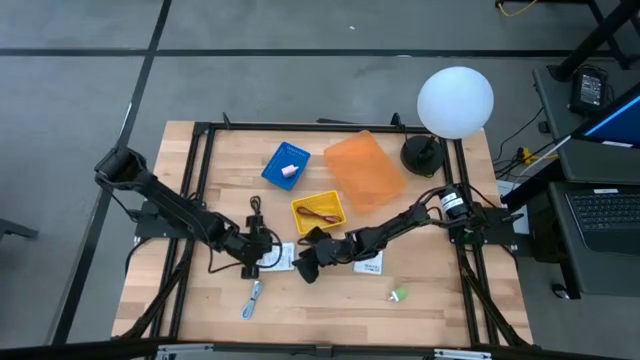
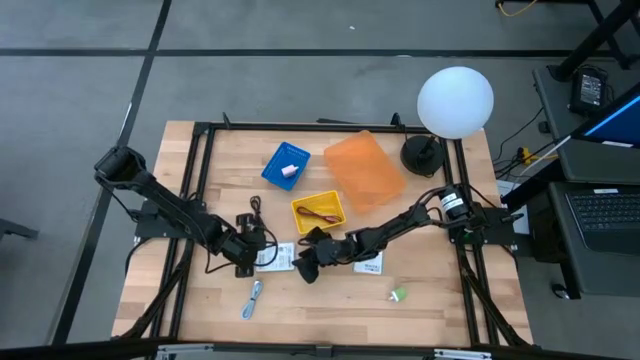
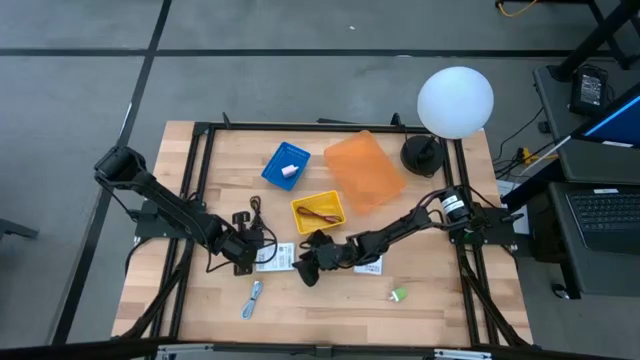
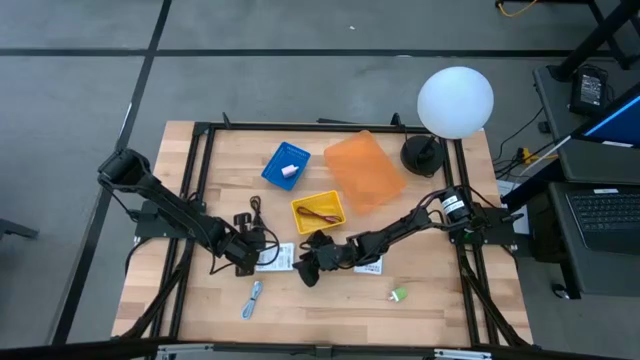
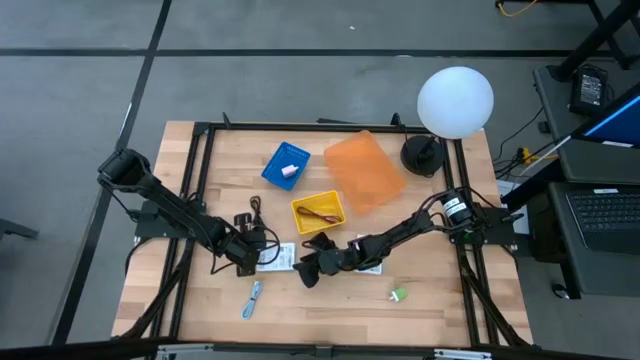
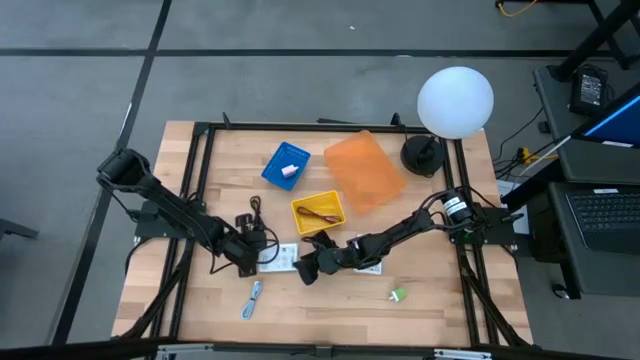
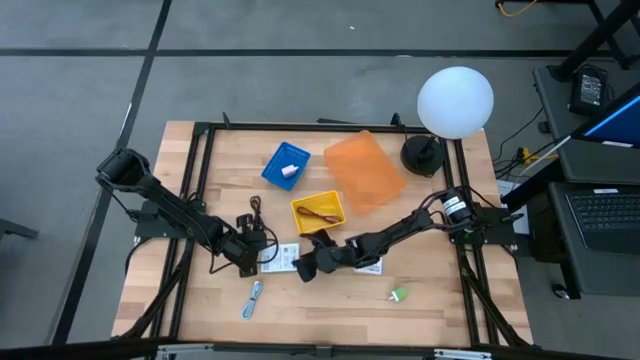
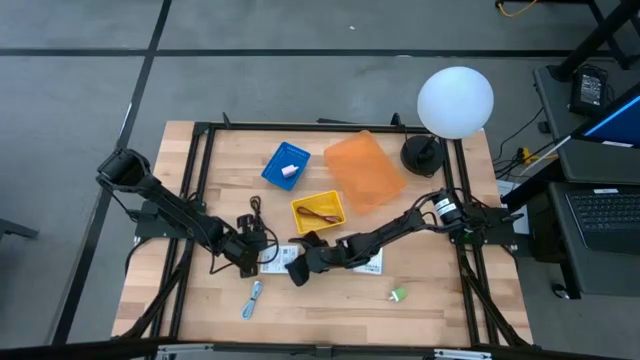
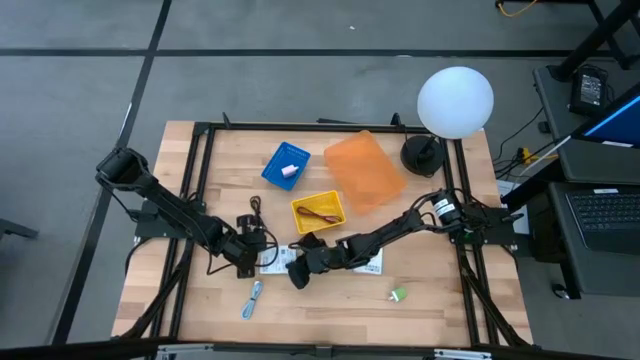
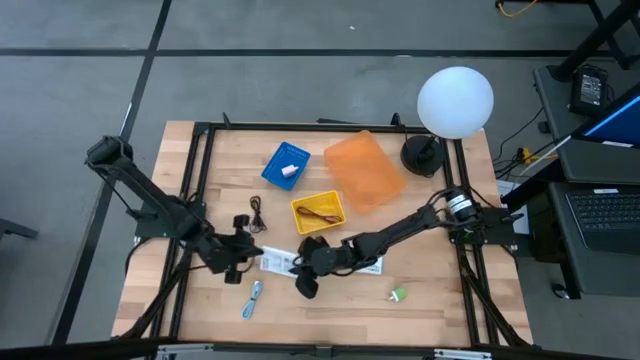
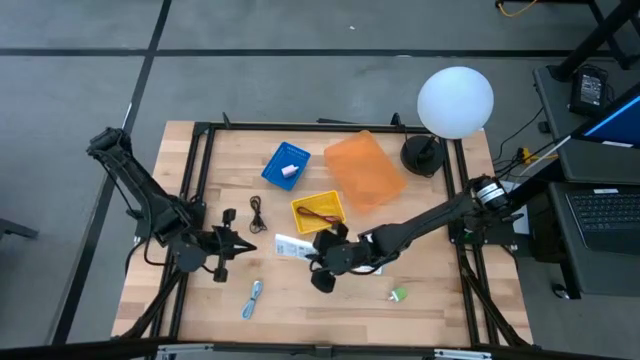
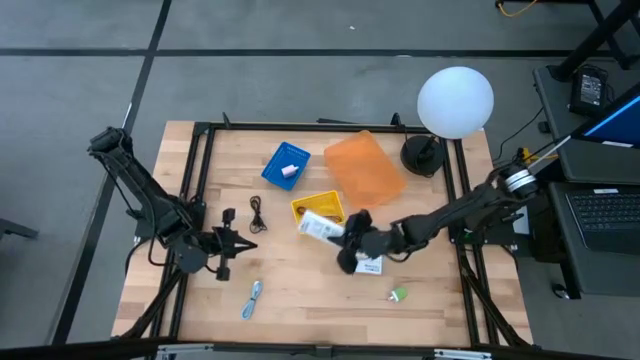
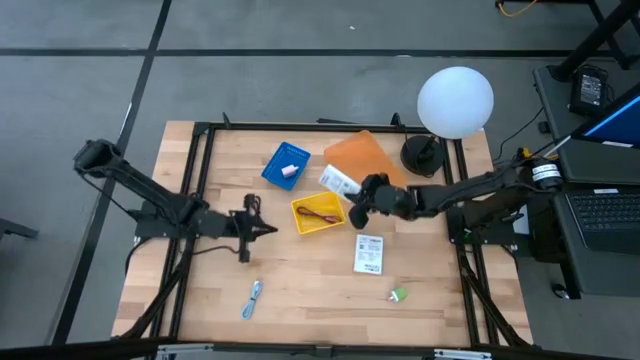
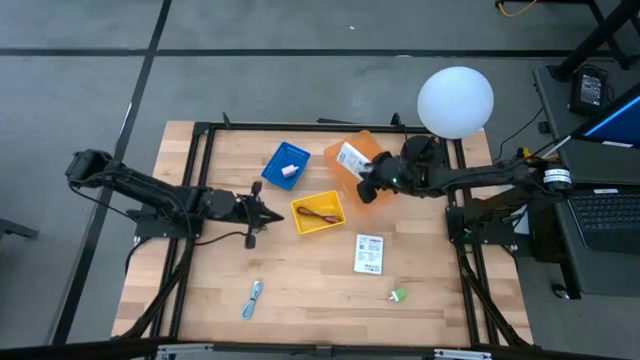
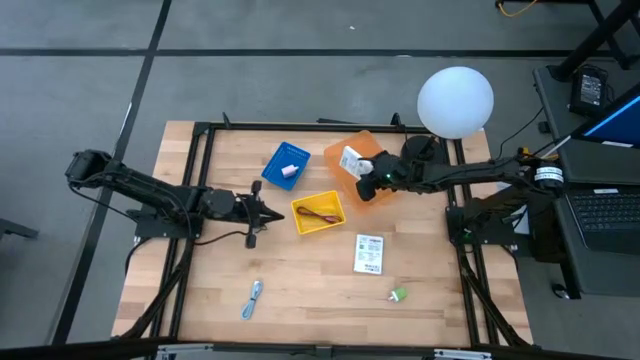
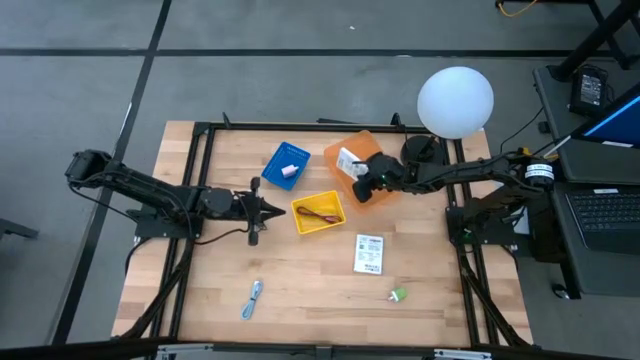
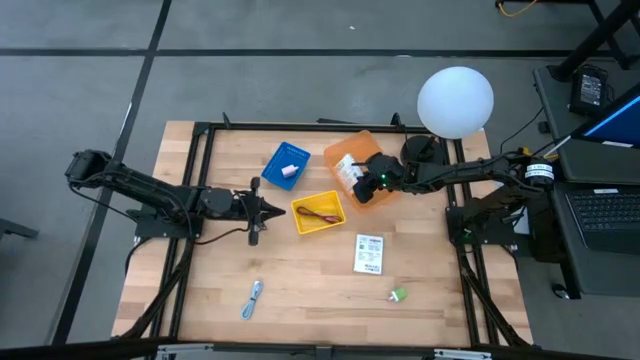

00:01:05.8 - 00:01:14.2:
Task: Pick and place items into bin
Put the white card reader box into the orange bin

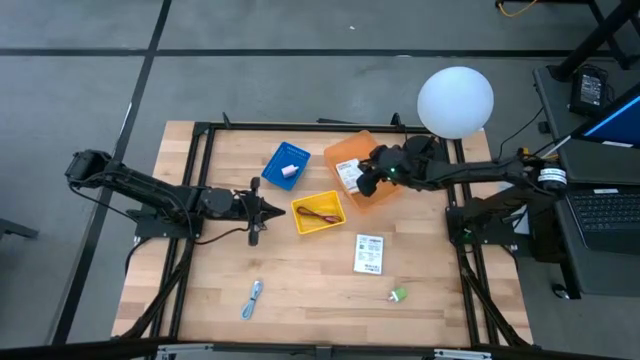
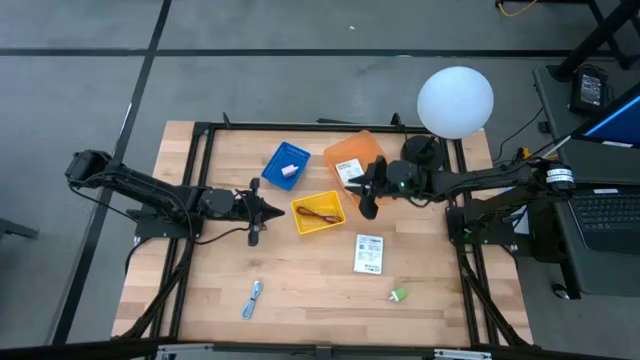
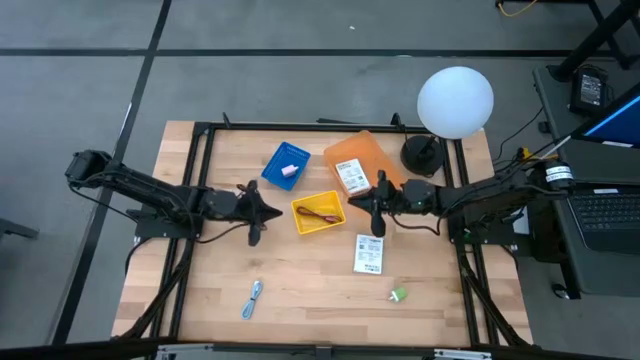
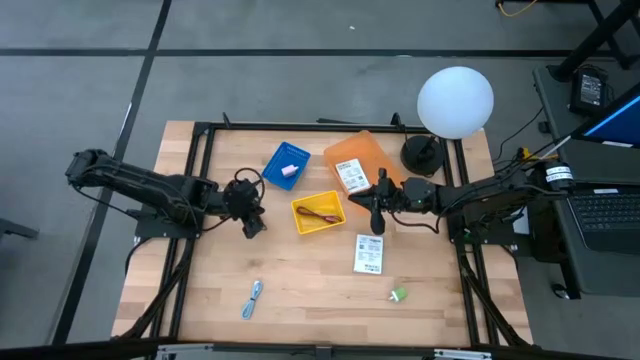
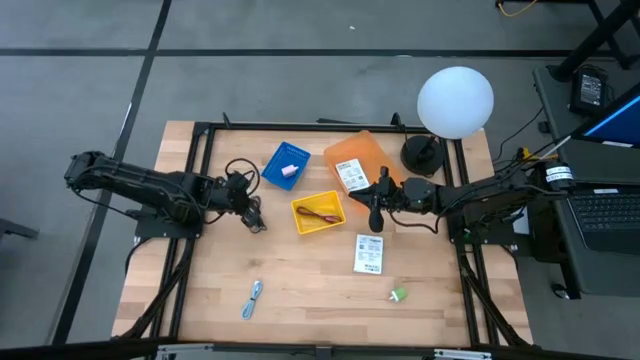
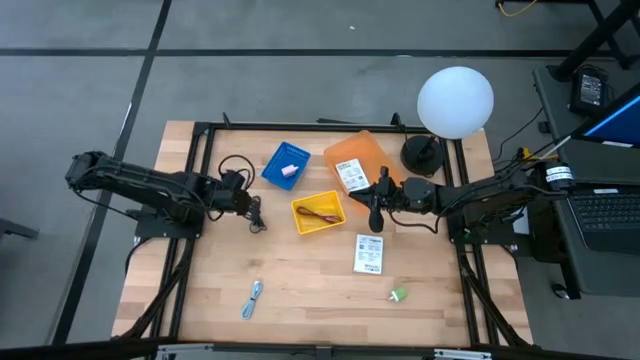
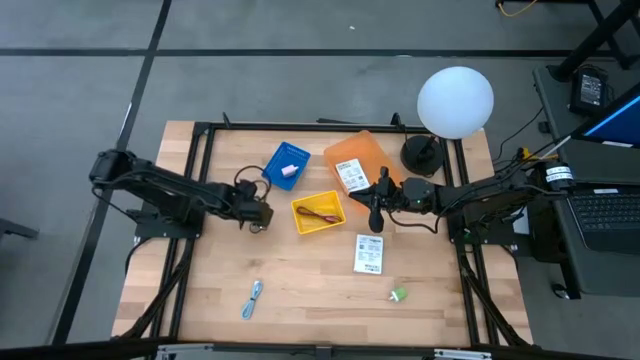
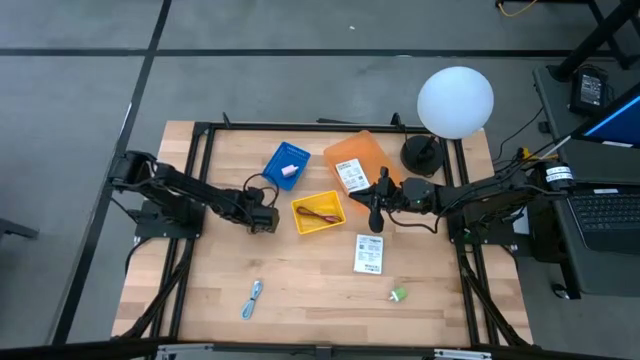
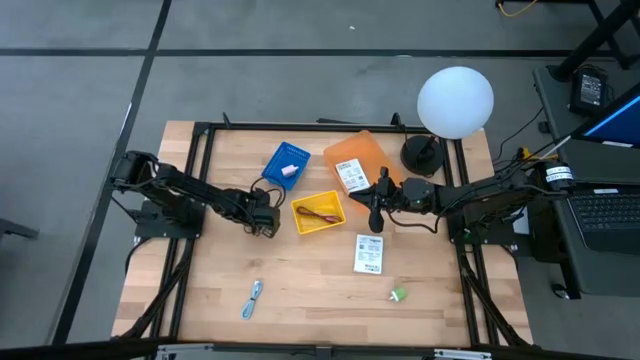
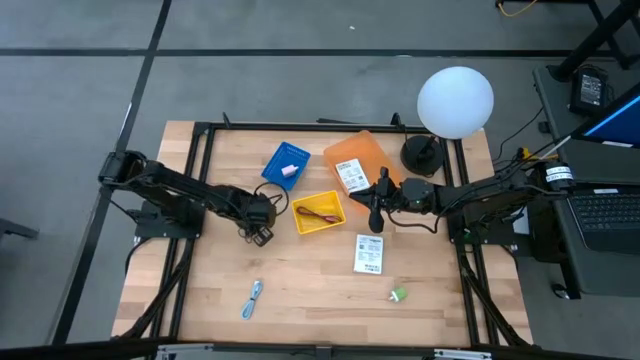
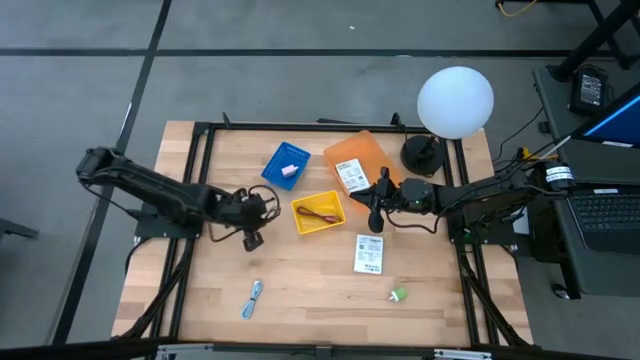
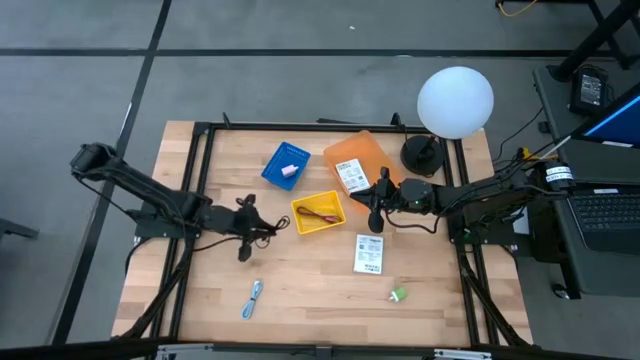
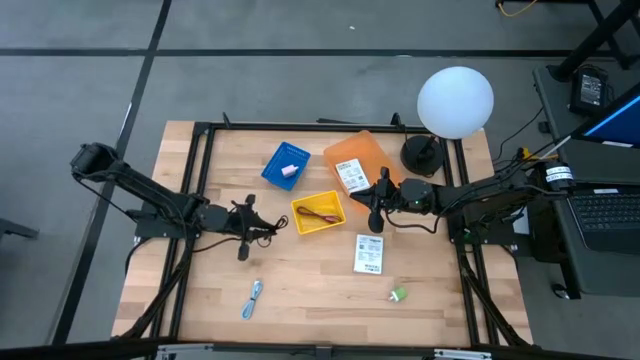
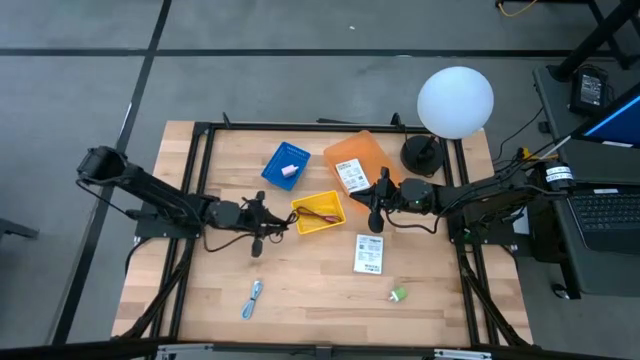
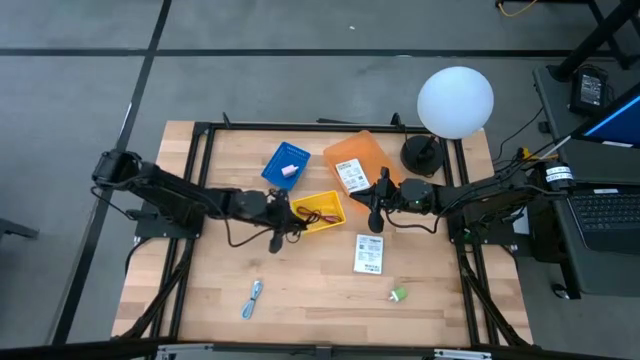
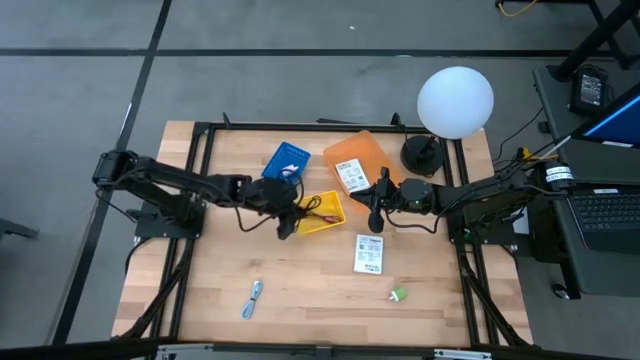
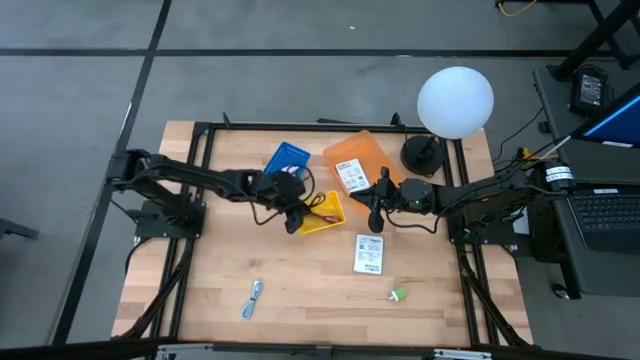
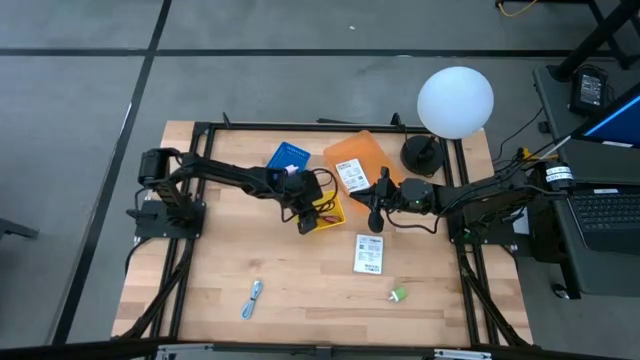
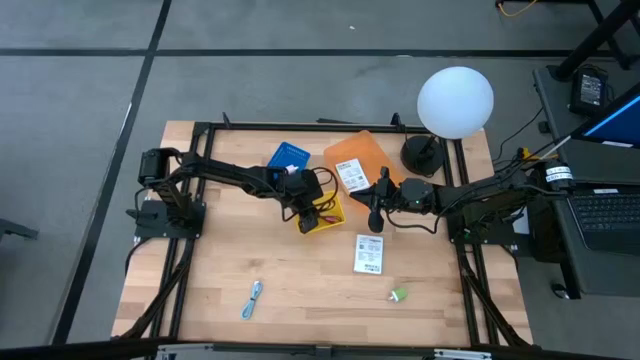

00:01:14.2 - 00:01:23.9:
Put the black USB cable into the yellow bin
